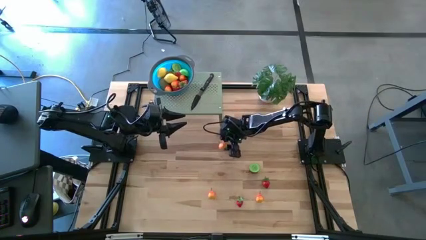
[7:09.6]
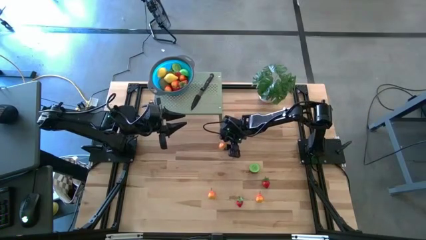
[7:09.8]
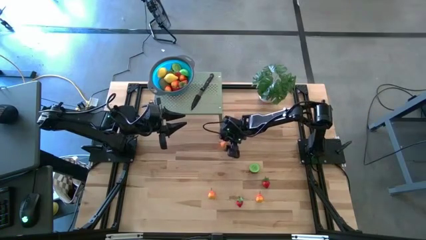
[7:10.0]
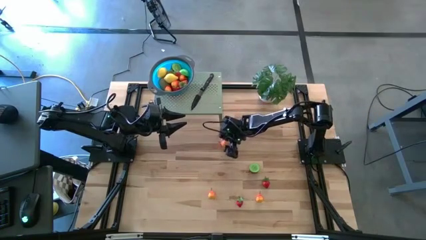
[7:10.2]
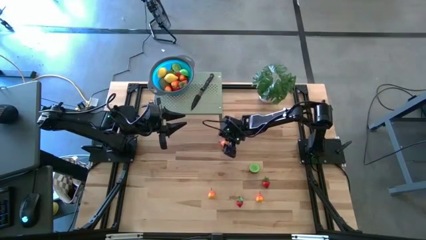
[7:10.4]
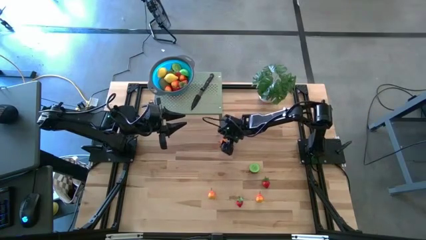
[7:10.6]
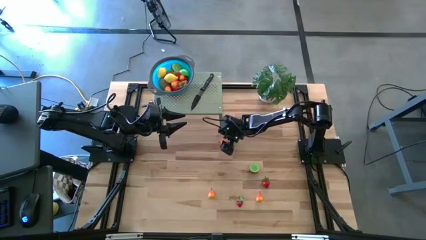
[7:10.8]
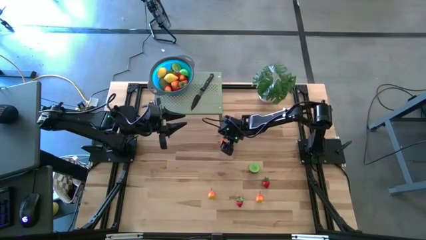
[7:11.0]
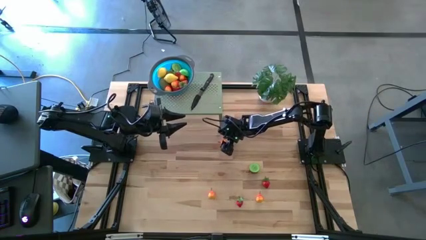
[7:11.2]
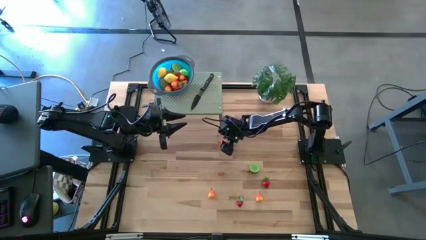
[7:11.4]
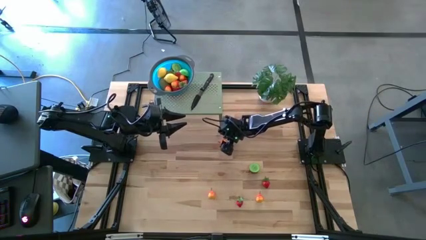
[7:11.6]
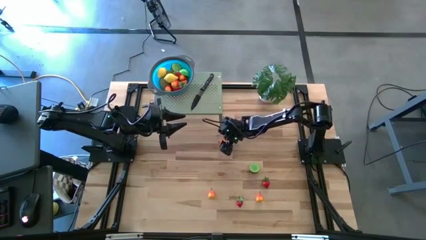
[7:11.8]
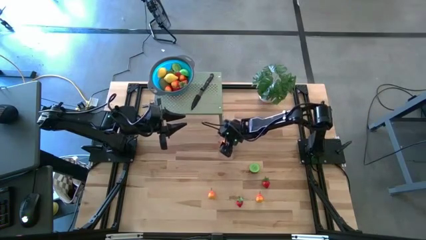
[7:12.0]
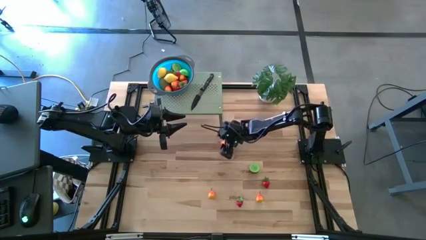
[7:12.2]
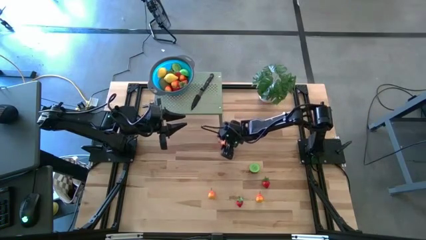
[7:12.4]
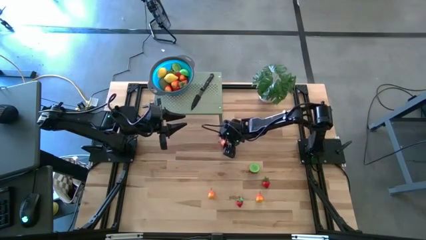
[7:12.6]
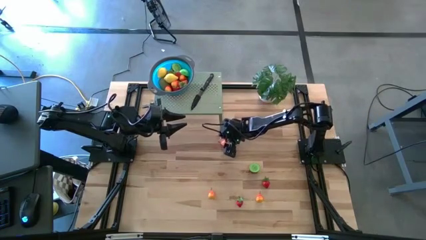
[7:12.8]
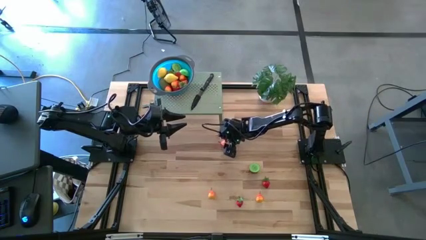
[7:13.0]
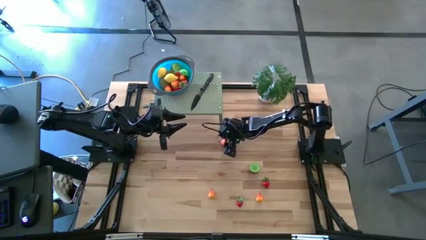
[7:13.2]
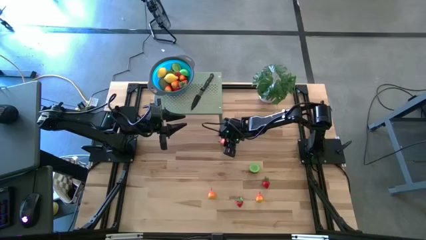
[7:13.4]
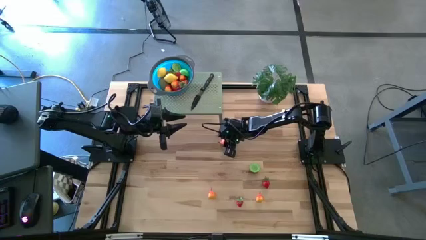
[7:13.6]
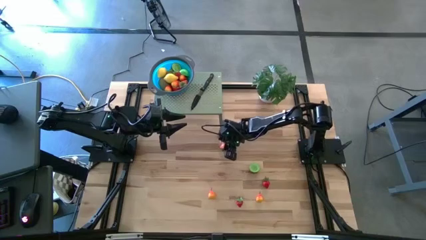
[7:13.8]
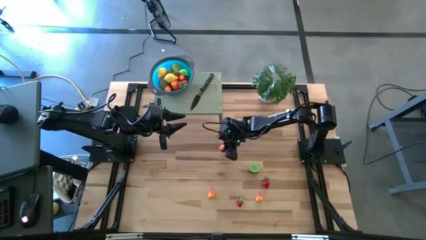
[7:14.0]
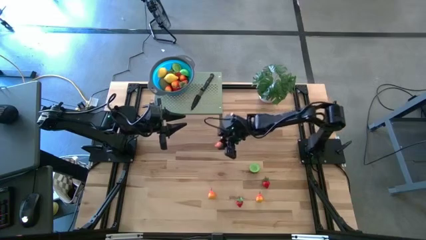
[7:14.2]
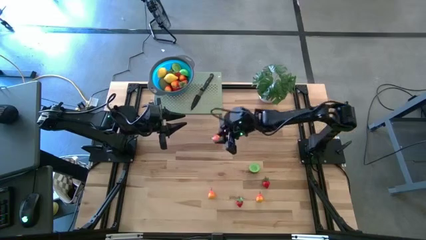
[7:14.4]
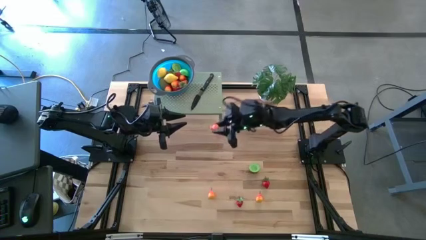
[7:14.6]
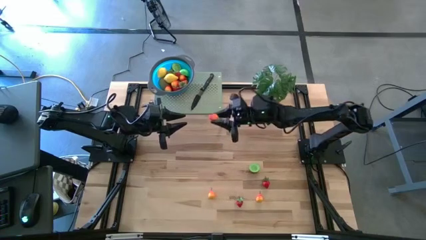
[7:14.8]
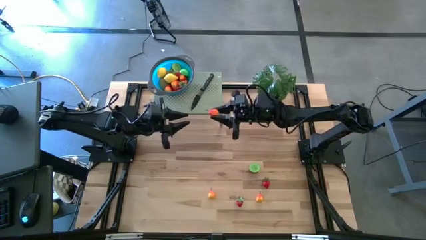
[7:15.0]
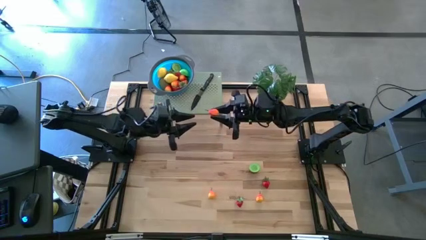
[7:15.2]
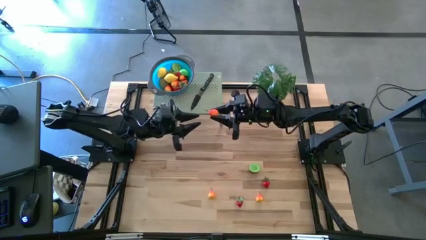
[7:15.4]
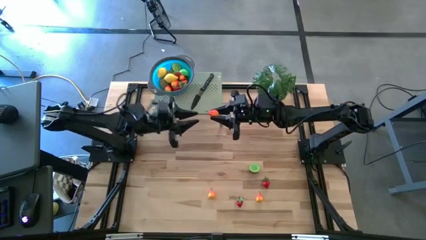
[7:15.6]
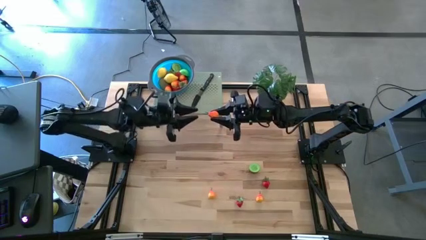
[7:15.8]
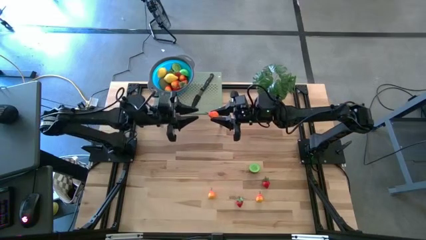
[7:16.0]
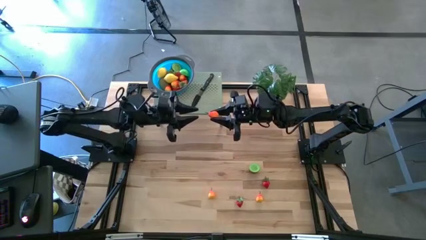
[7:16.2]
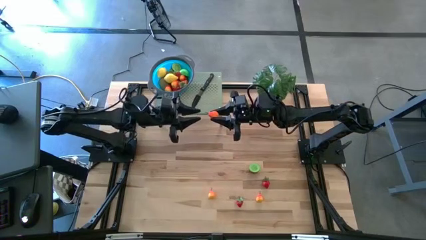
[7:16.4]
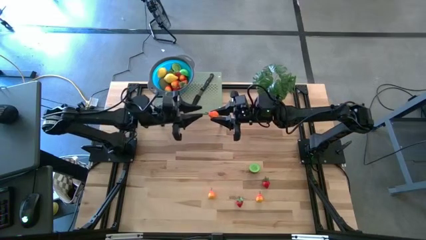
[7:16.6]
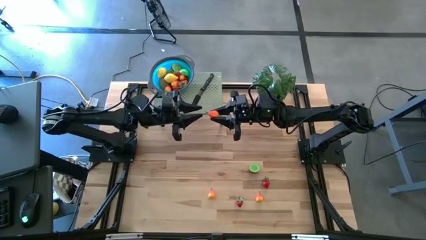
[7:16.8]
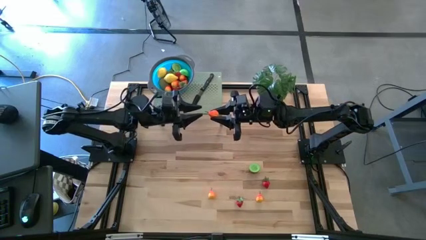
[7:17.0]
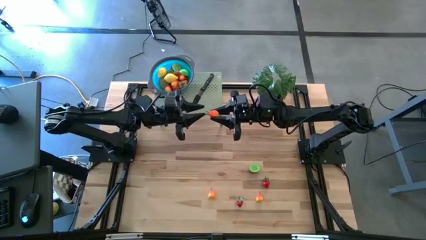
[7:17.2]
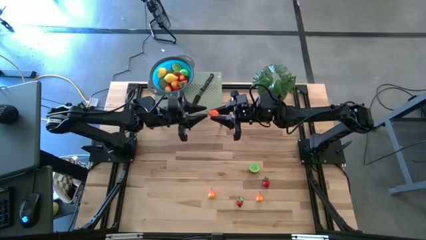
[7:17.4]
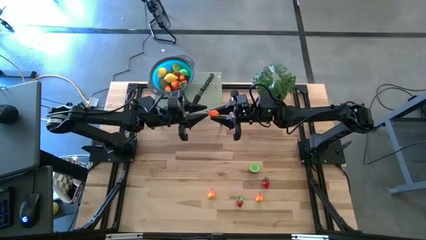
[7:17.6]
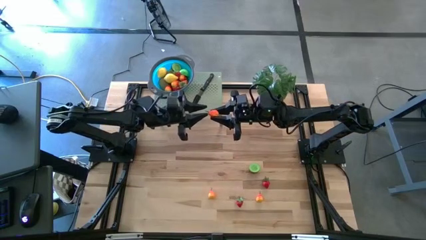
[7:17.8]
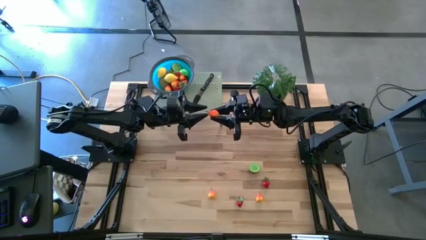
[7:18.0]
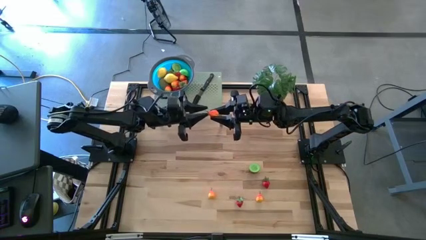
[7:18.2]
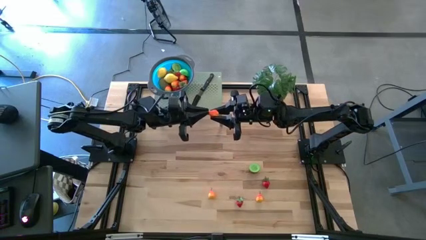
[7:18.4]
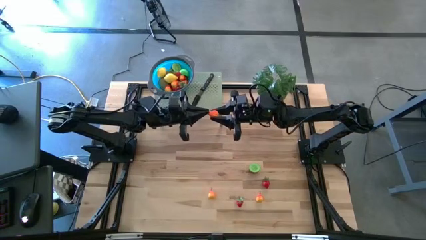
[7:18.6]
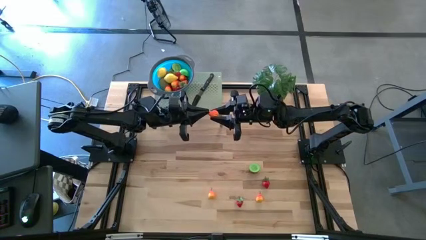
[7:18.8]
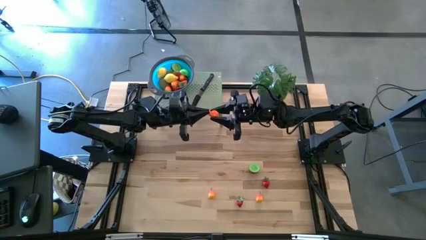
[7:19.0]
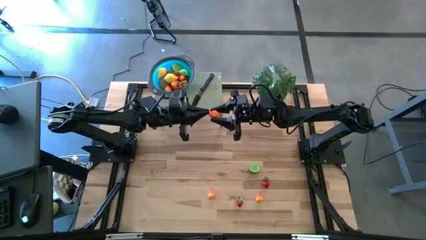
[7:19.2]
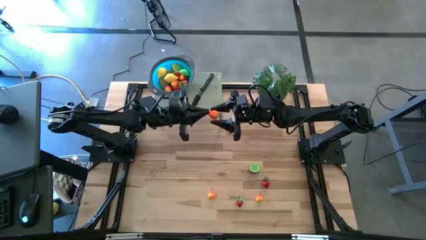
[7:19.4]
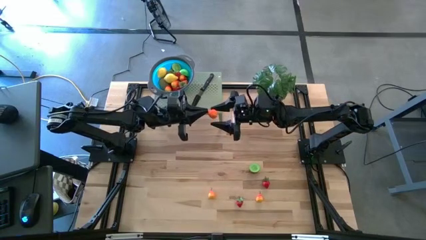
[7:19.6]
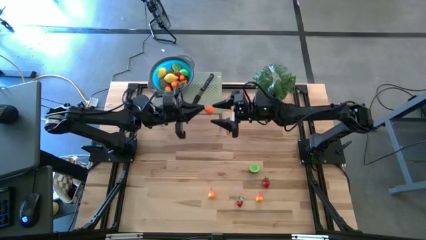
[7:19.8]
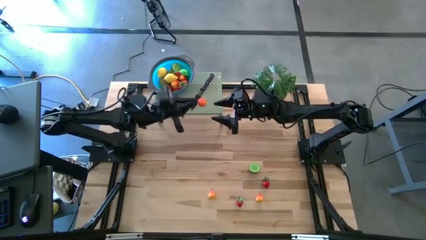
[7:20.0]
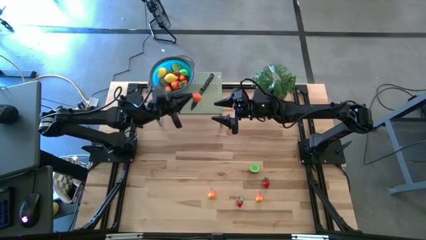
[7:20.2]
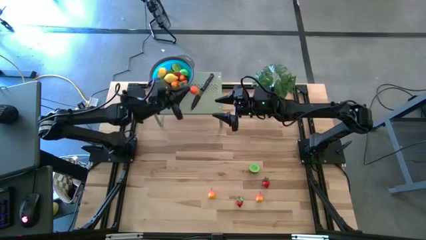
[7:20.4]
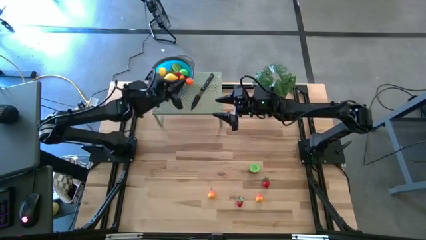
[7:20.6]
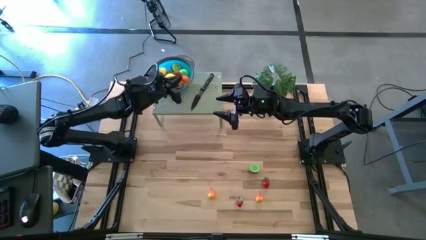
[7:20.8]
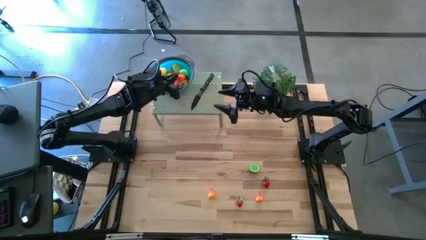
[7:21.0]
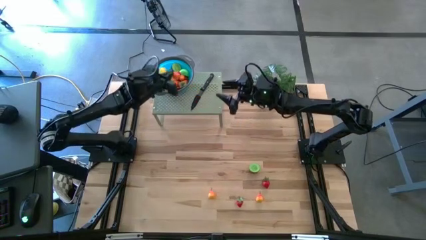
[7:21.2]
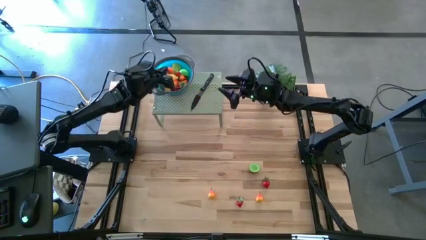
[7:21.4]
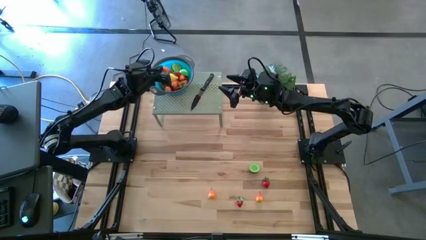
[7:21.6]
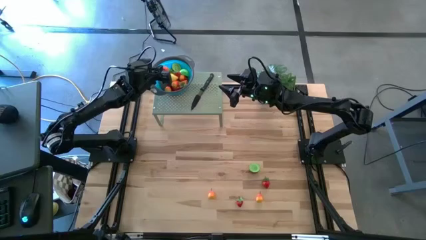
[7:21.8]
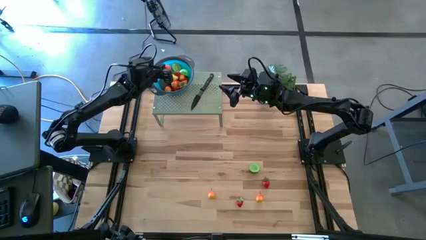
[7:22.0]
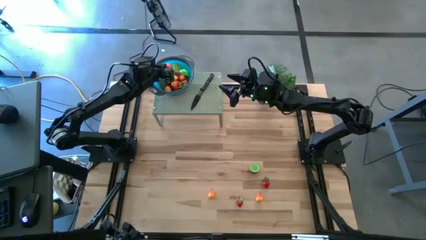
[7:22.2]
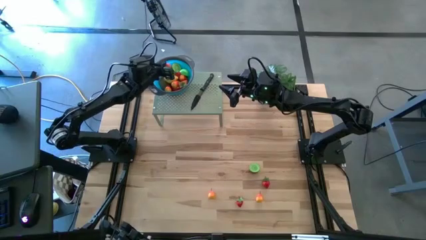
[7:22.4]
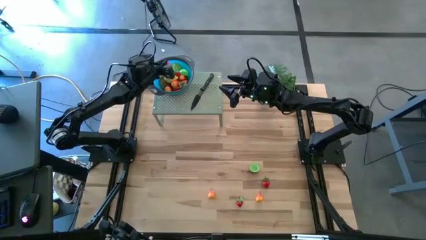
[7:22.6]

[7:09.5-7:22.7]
Task: Pick & Place Fruit
Put the orange pear into the strainer bowl on the shelf

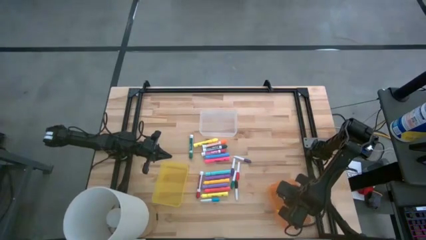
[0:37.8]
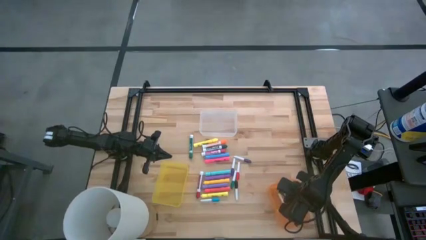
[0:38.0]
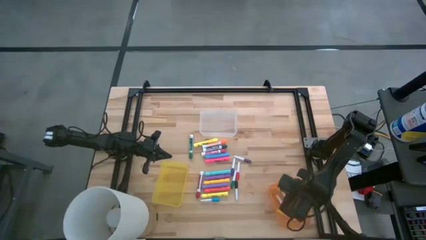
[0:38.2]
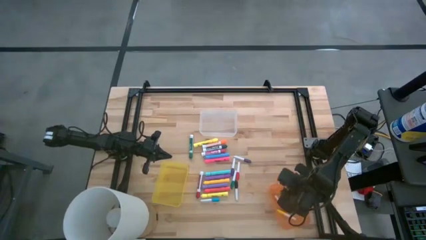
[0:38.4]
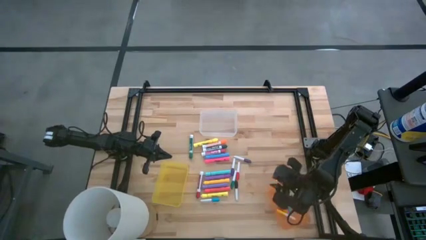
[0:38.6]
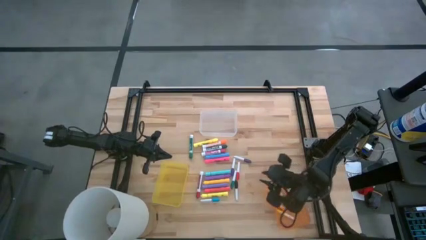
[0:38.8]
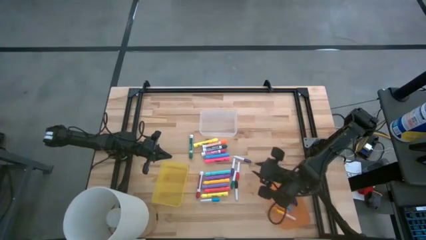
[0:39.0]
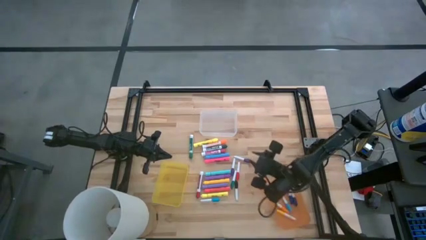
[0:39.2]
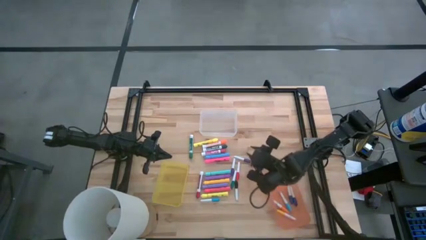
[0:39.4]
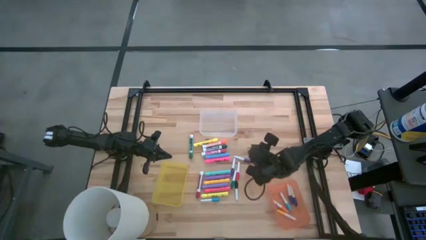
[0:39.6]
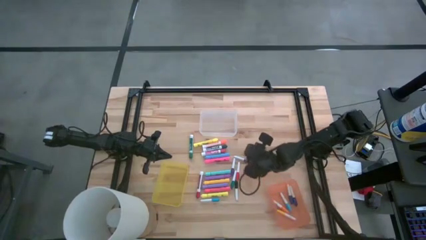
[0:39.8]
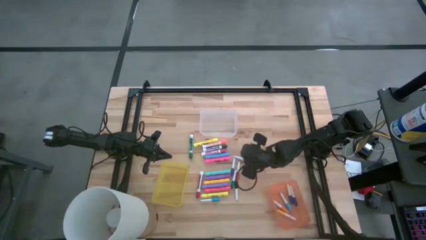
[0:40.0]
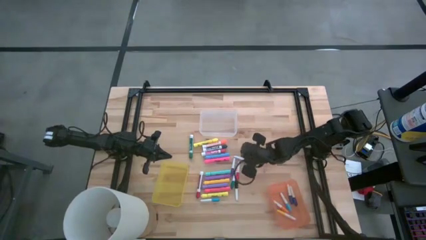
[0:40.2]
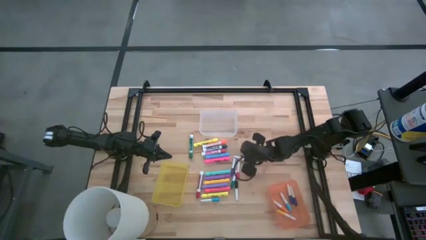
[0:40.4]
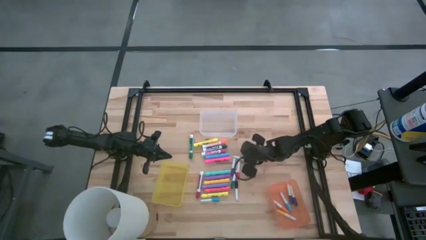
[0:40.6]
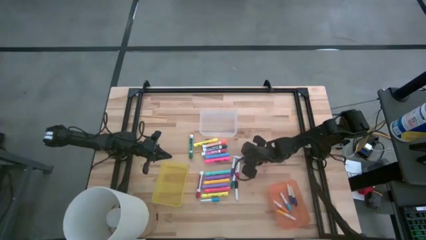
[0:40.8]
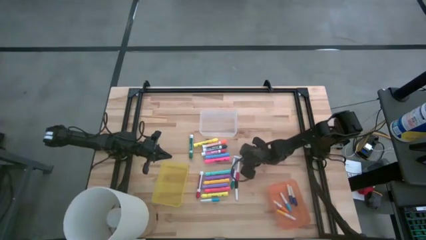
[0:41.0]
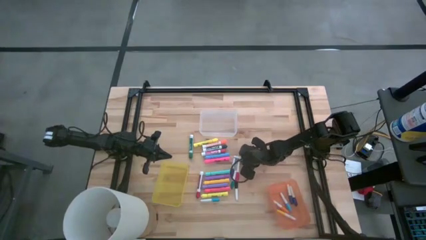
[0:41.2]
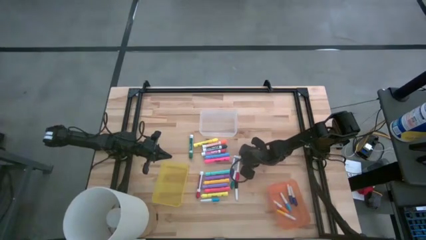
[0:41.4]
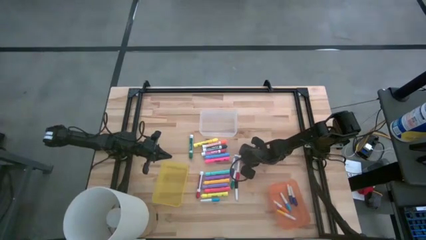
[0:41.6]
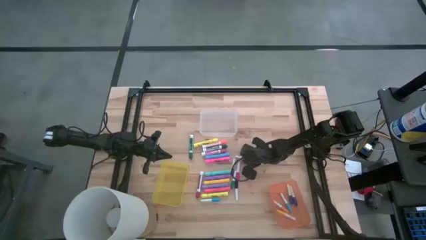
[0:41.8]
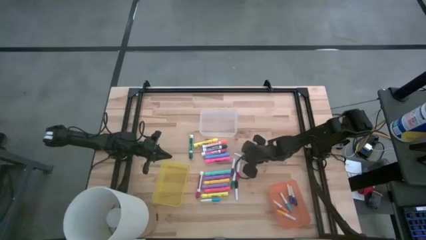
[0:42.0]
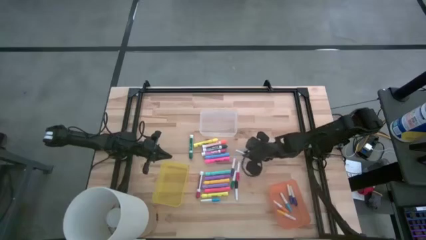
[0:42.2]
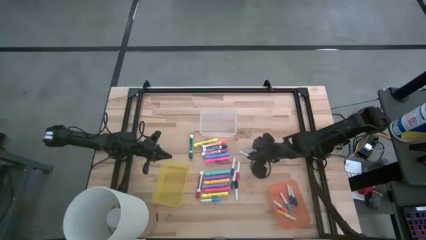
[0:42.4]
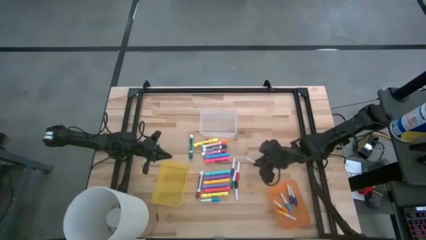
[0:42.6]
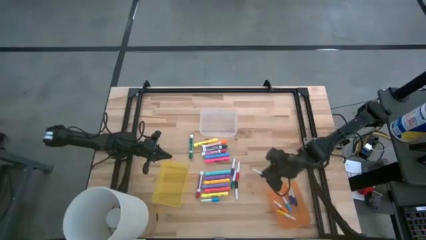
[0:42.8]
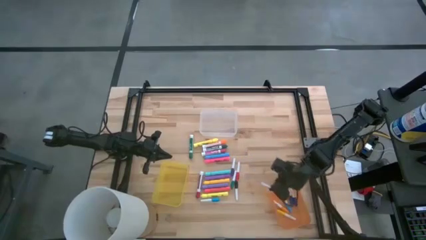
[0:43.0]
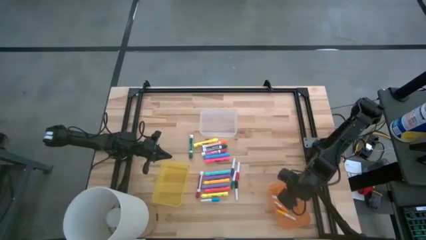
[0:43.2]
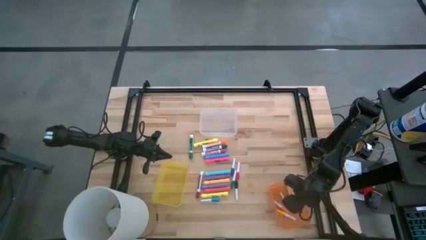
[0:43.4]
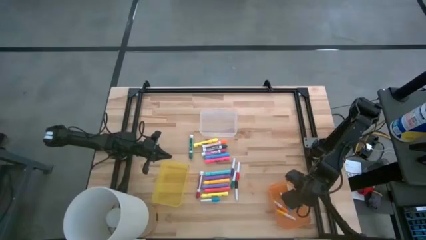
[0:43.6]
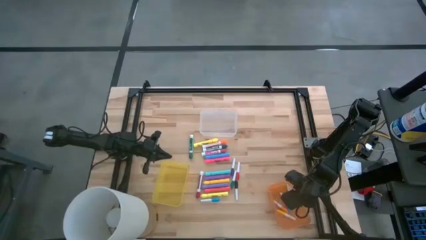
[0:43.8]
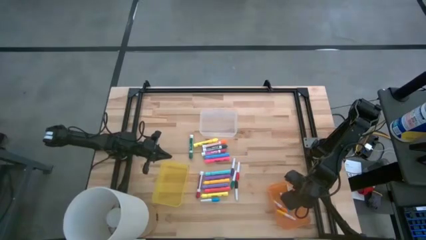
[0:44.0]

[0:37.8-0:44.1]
Task: Pick & Place Markers
Put the top small purple highlighter pen into the orange bin
